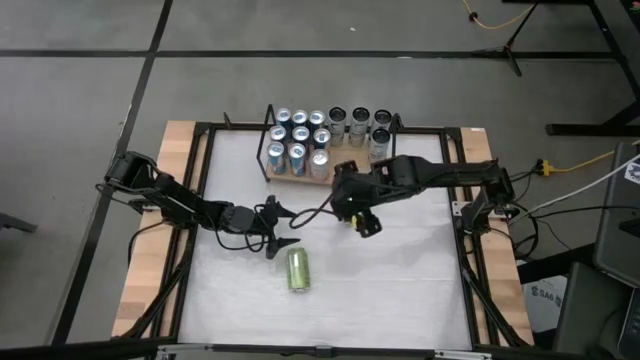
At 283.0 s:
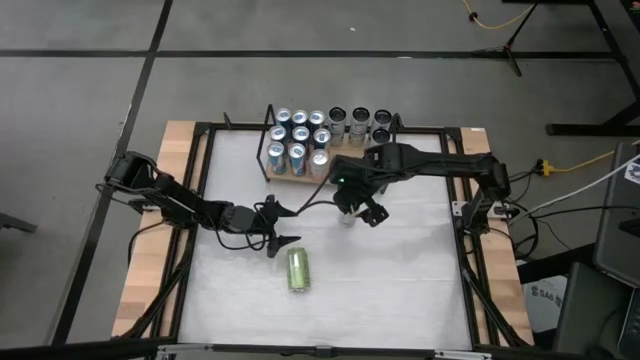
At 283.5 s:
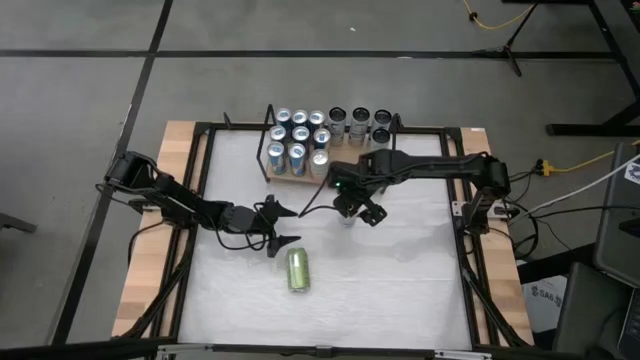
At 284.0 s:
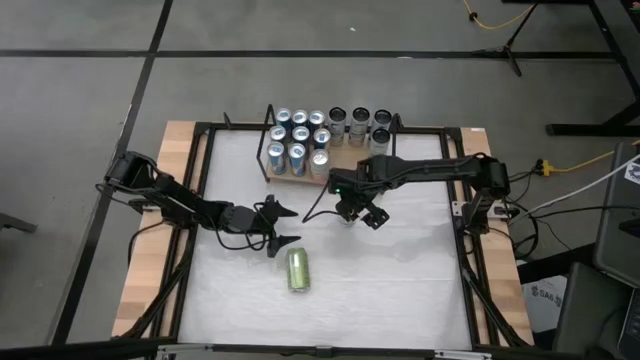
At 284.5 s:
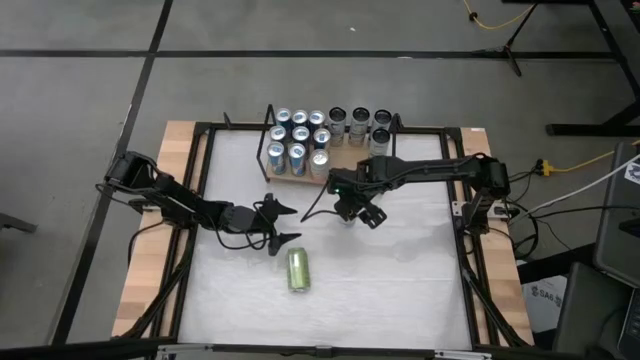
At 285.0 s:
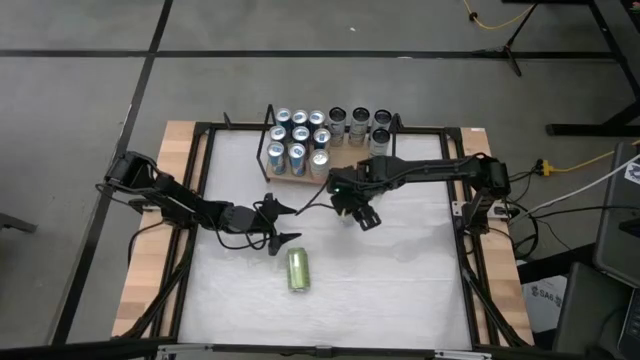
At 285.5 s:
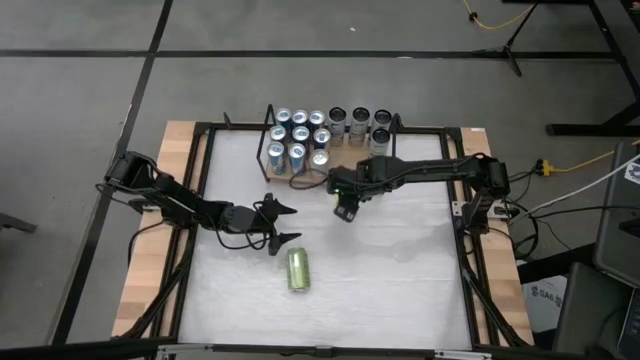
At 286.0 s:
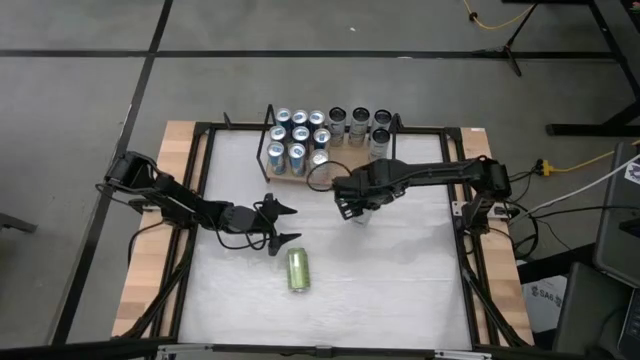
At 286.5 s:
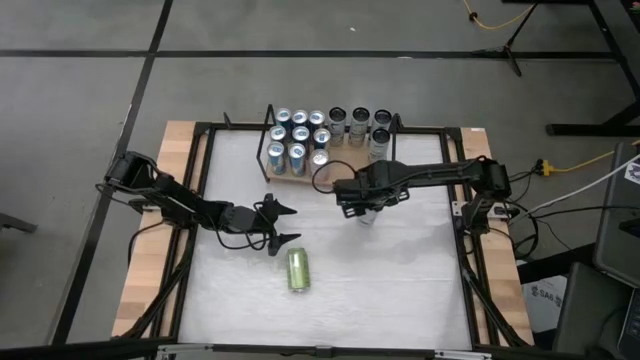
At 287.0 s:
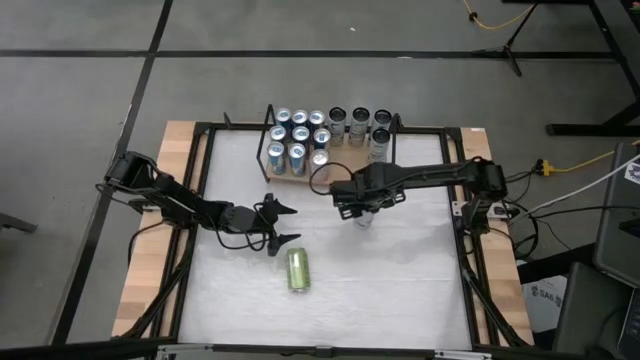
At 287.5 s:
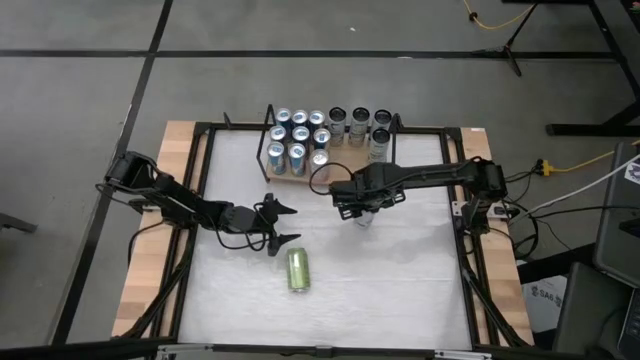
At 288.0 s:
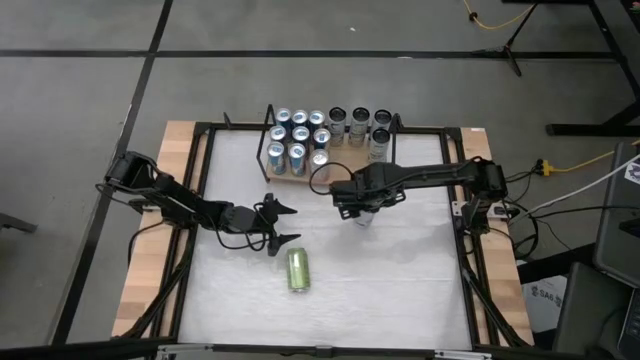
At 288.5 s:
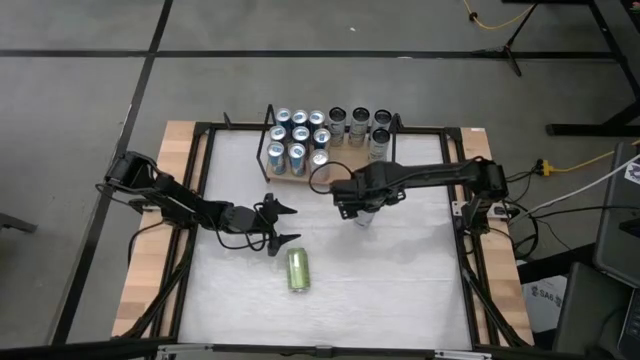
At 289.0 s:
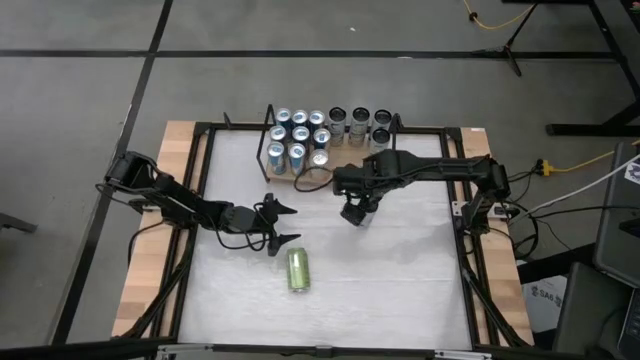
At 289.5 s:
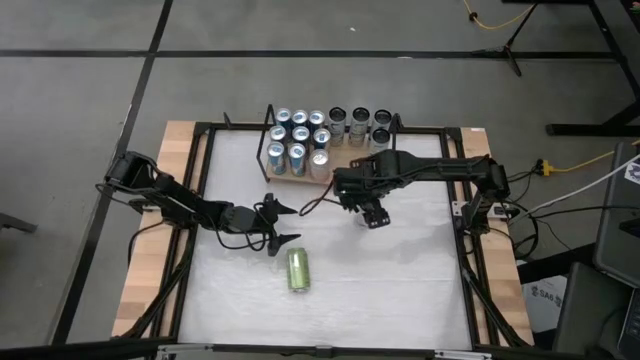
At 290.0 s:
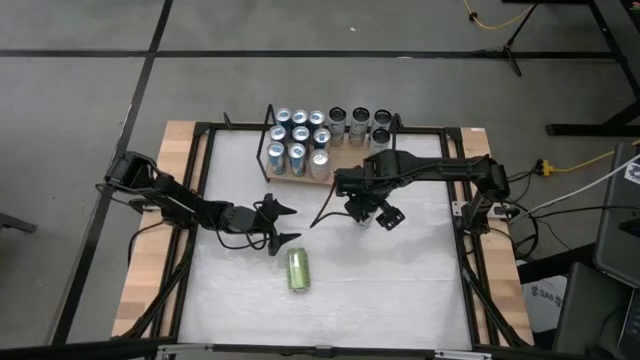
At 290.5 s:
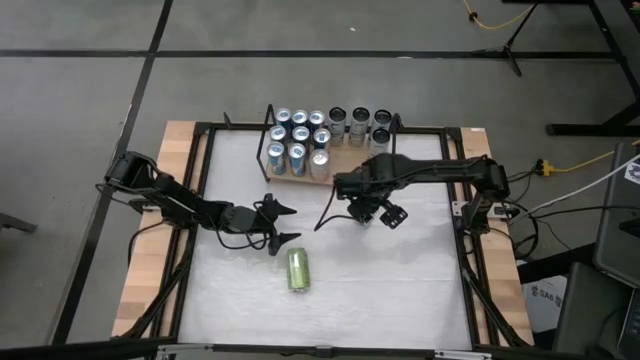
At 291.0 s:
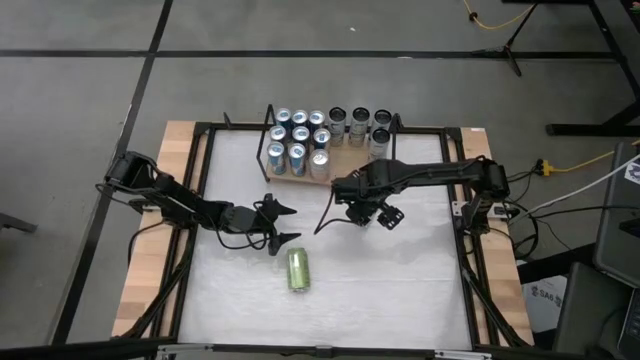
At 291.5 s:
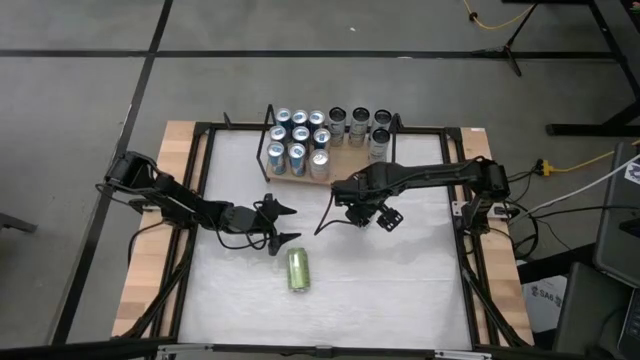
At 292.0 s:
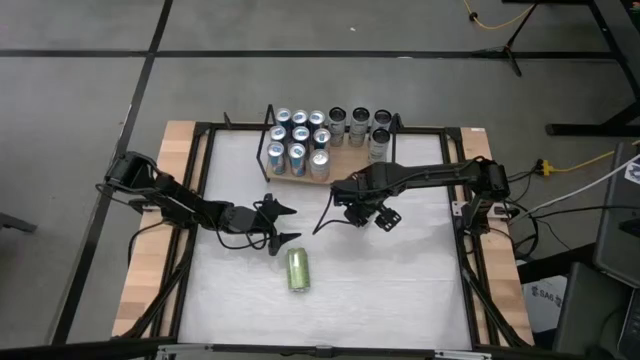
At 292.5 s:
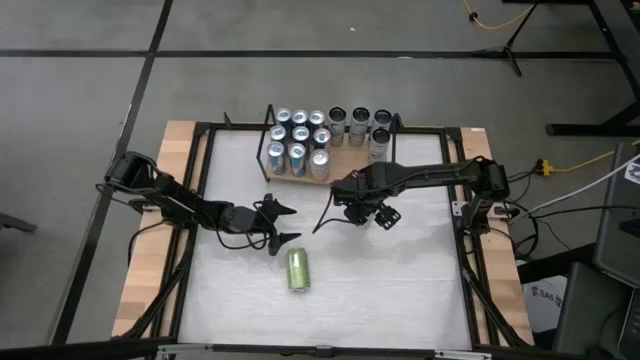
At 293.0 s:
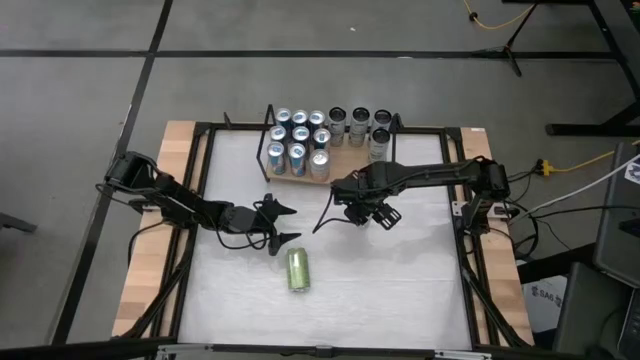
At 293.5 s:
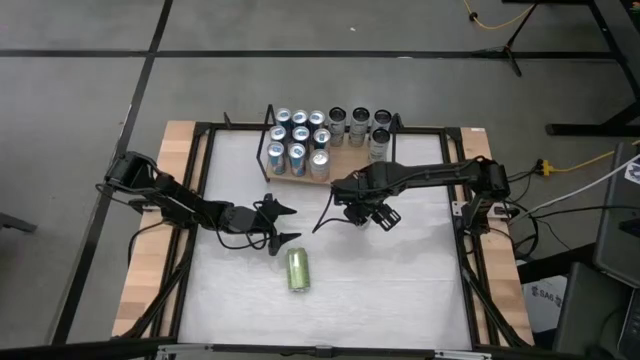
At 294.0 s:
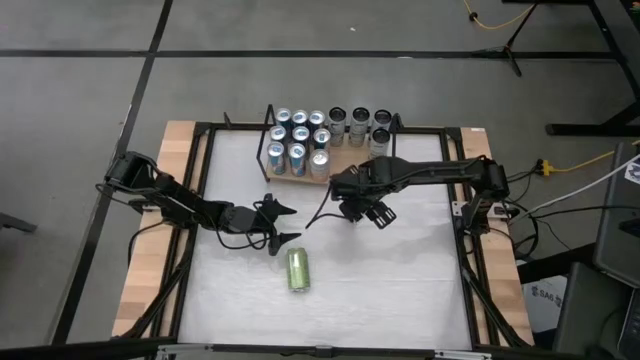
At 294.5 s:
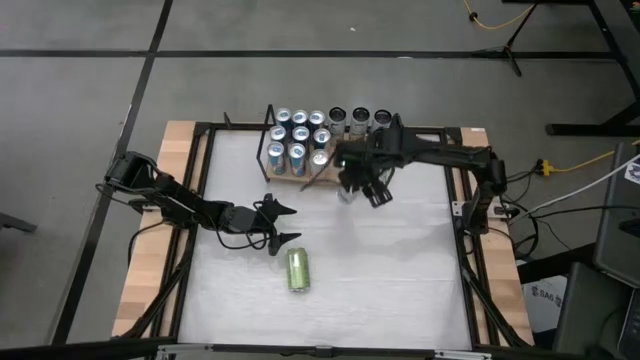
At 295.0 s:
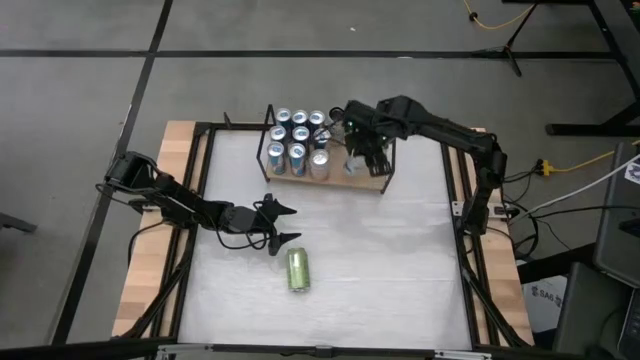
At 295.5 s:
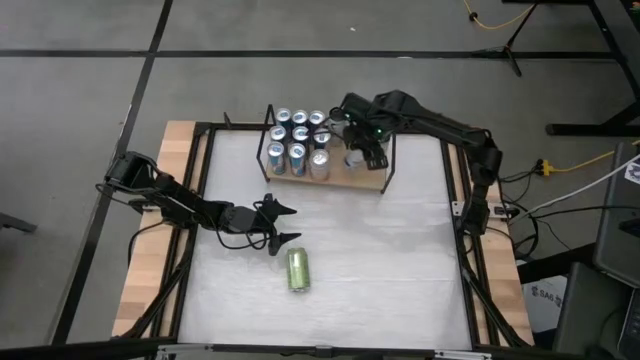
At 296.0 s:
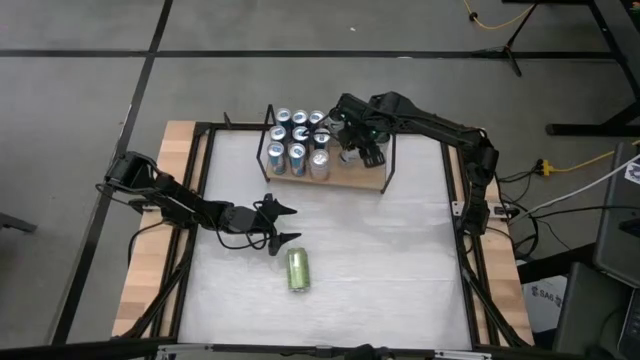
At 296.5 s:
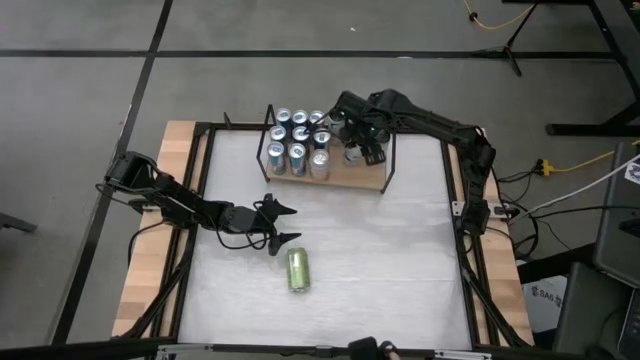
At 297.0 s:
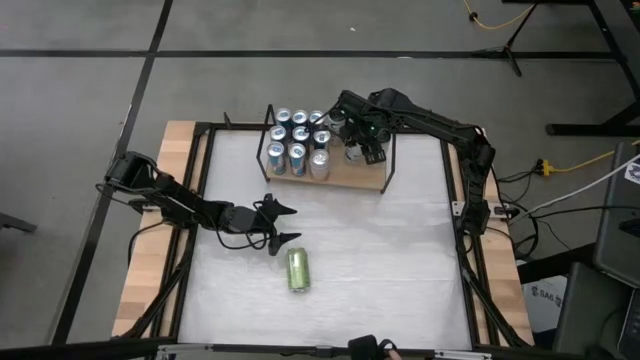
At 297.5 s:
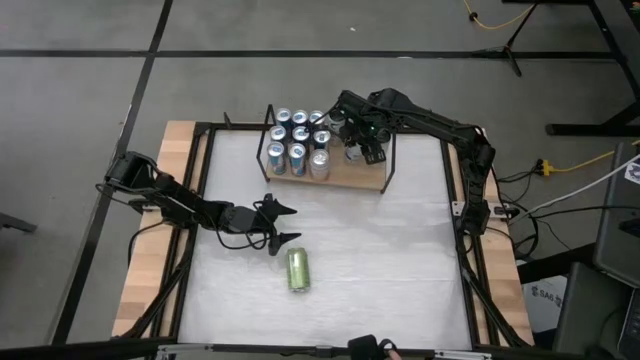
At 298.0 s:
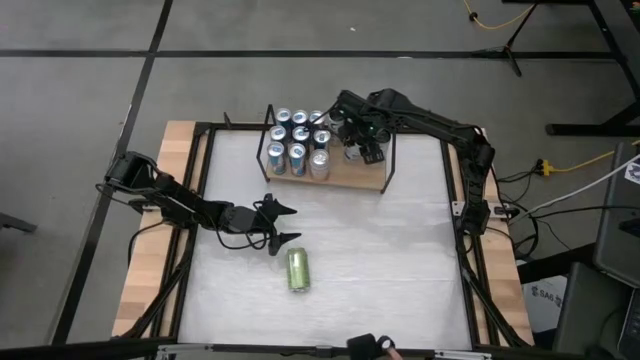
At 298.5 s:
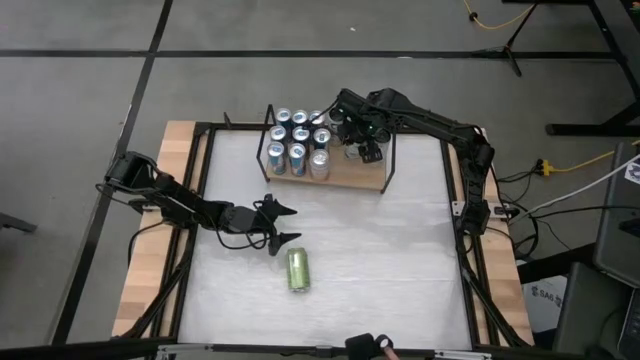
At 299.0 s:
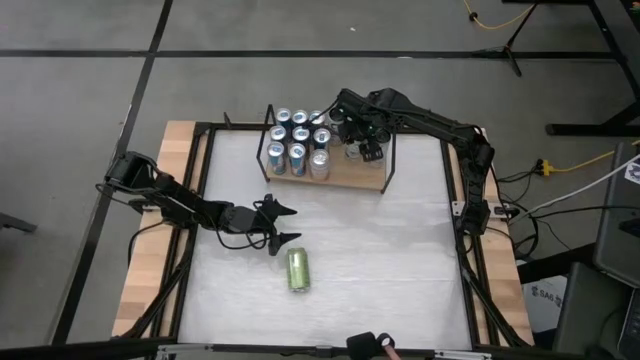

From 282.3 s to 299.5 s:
Task: Place canned beverage on shelf
Put the white blue soda can on the shelf aligned with the other white blue soda can

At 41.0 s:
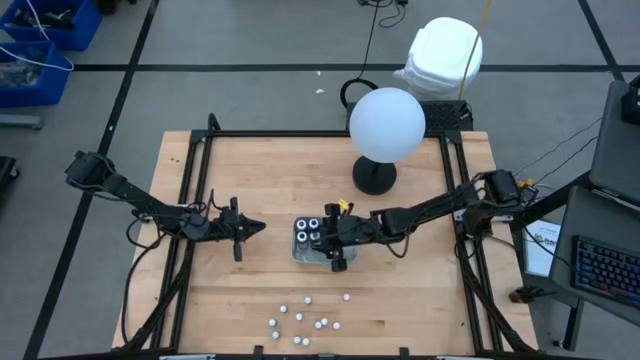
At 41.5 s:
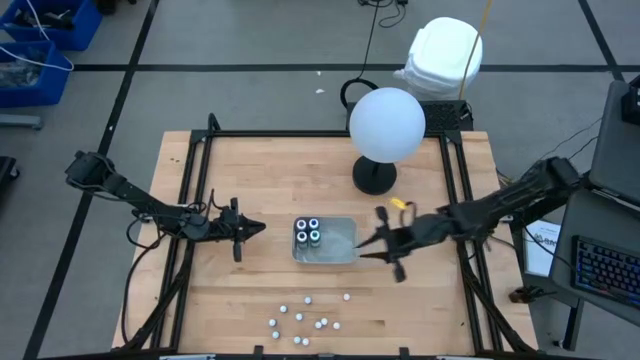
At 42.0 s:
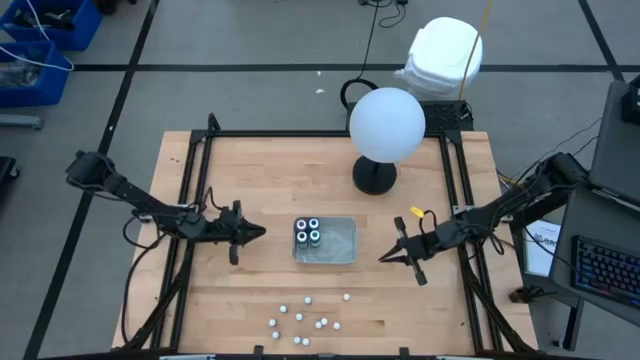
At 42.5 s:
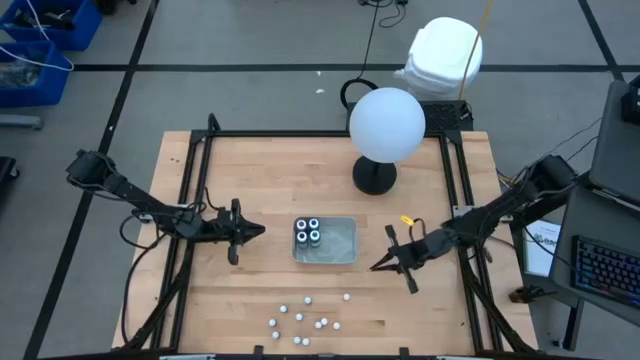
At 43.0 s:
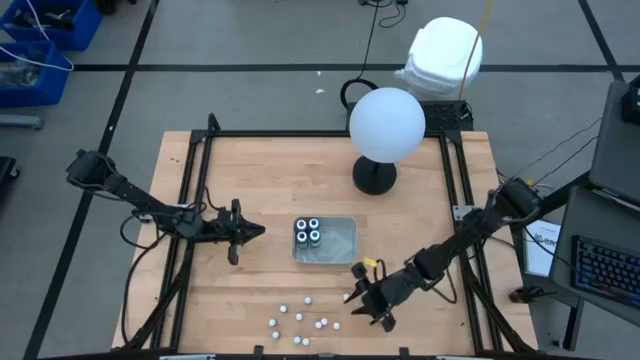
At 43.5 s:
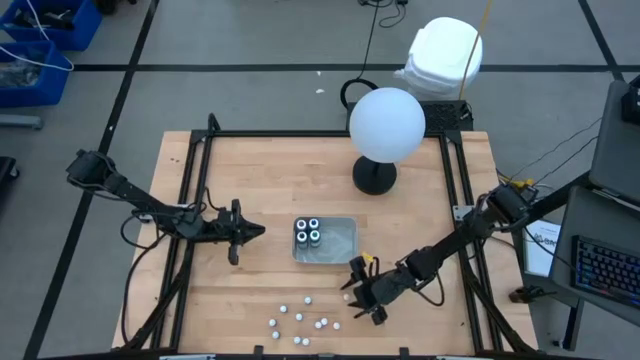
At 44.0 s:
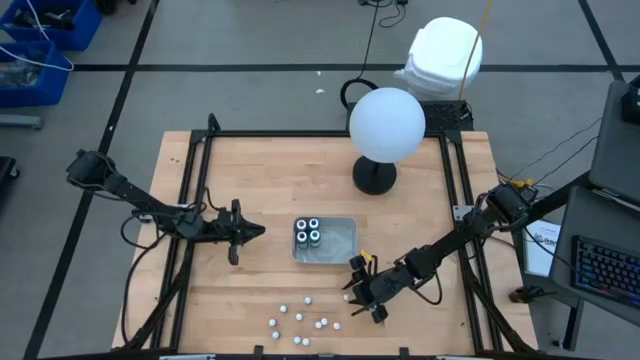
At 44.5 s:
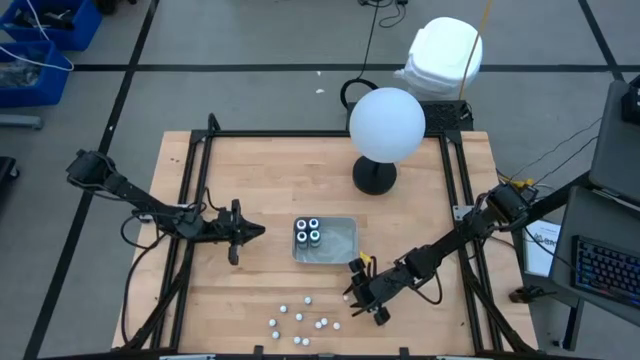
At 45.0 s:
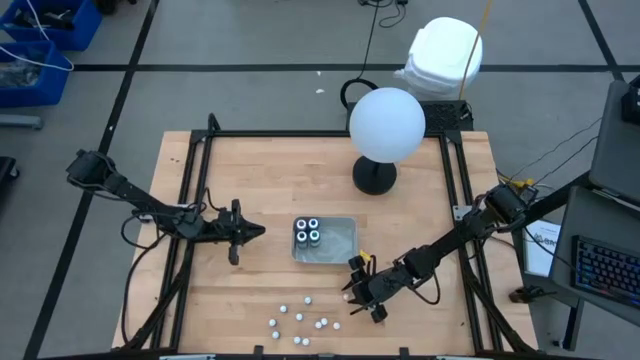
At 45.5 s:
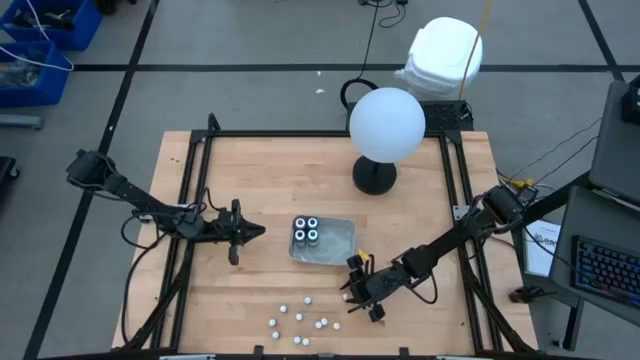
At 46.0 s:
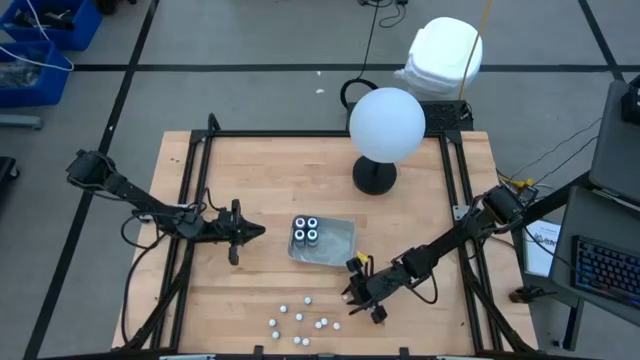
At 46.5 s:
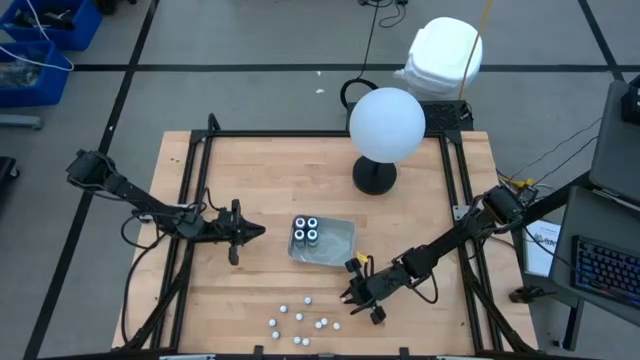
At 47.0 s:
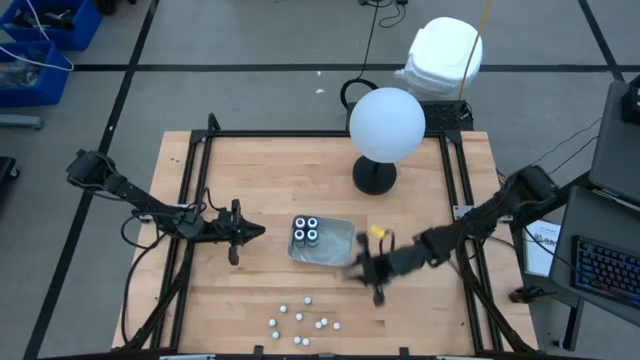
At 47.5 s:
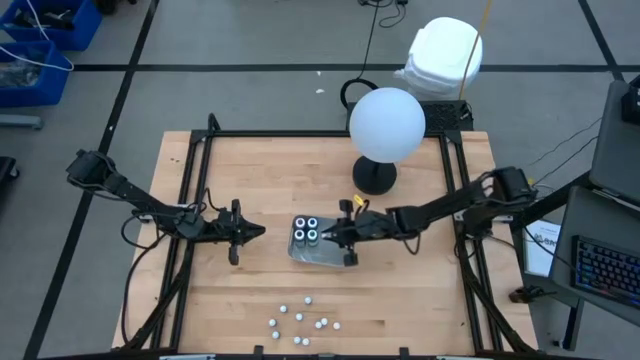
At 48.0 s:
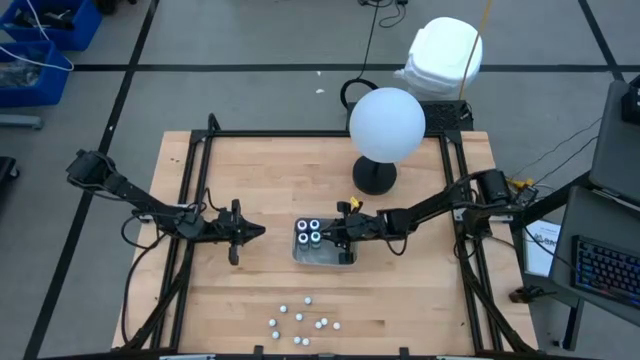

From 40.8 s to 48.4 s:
Task: Pick & Place food coloring
Put the small yellow food coloring bottle into the gray bin
